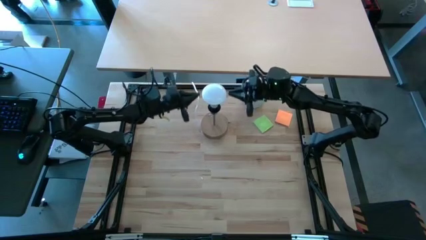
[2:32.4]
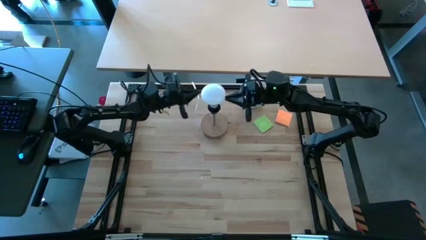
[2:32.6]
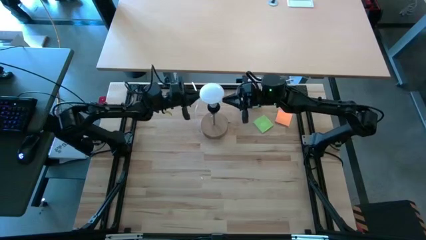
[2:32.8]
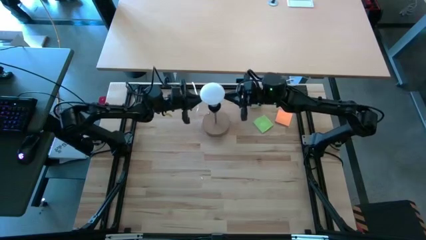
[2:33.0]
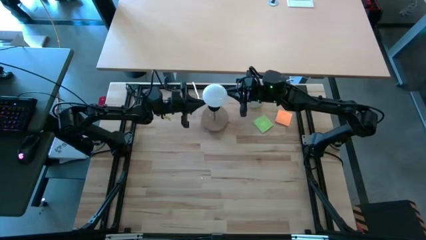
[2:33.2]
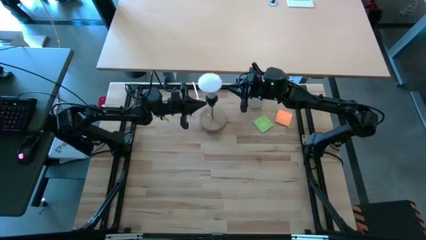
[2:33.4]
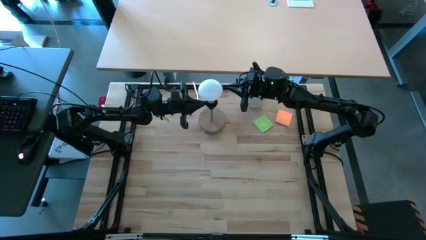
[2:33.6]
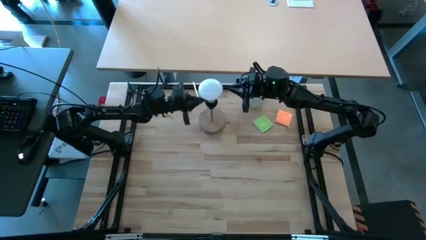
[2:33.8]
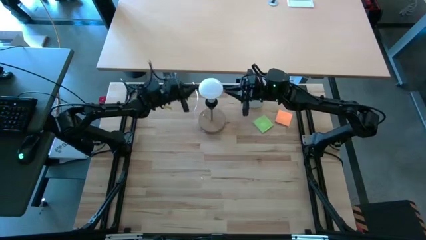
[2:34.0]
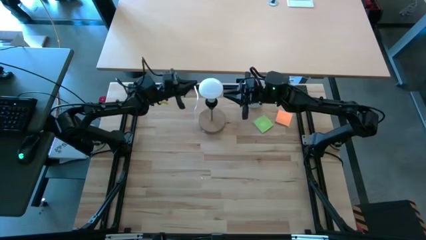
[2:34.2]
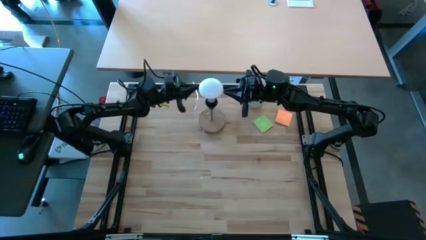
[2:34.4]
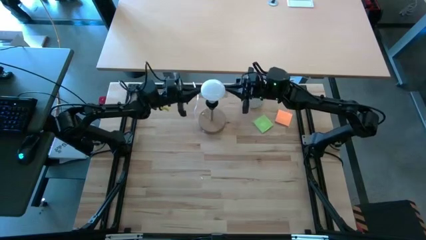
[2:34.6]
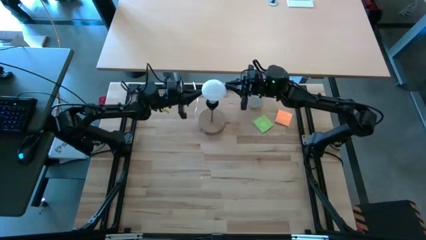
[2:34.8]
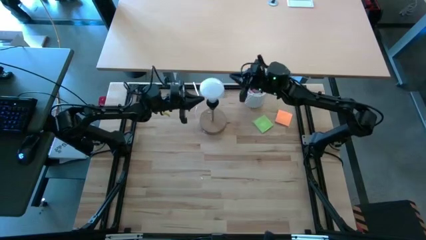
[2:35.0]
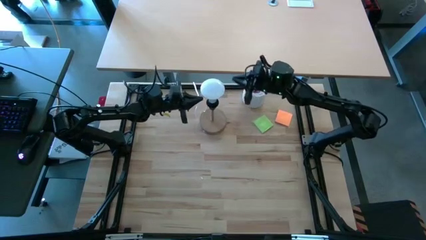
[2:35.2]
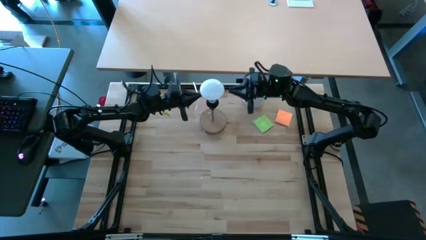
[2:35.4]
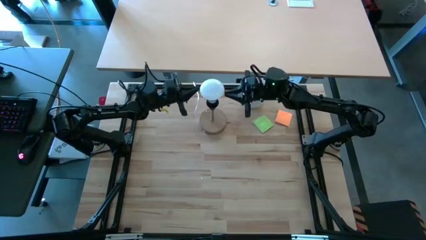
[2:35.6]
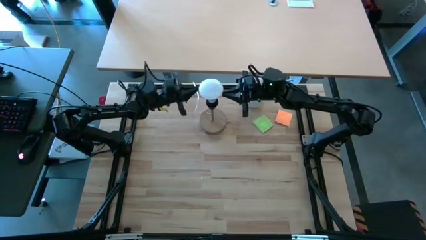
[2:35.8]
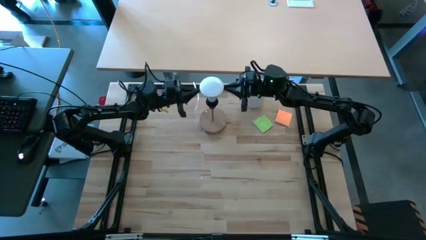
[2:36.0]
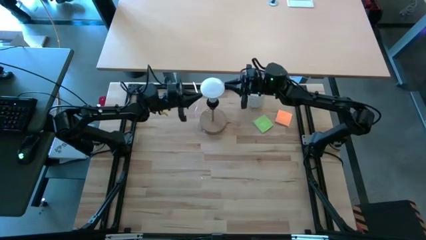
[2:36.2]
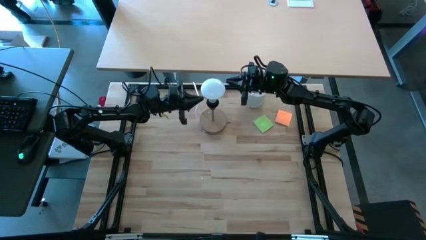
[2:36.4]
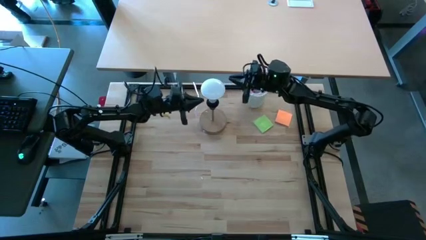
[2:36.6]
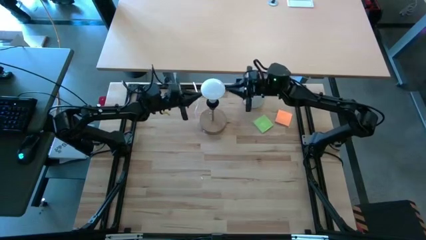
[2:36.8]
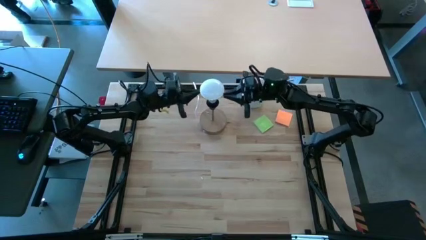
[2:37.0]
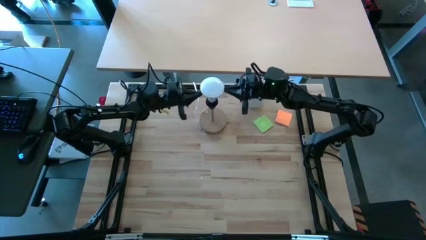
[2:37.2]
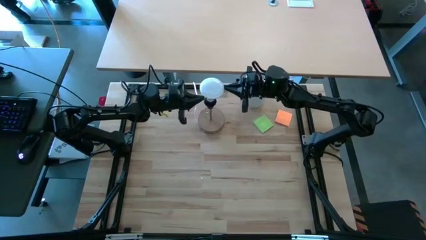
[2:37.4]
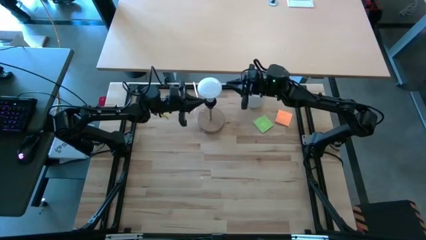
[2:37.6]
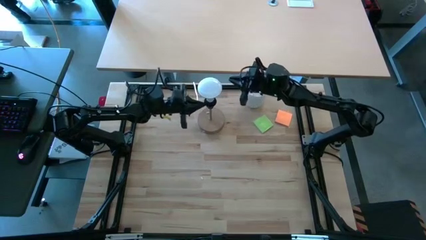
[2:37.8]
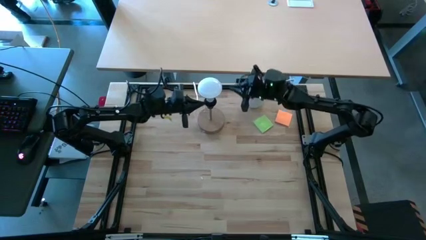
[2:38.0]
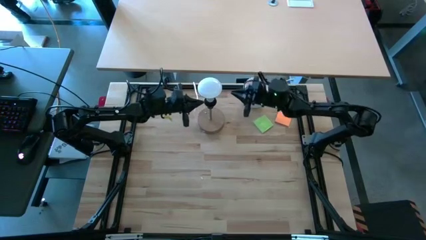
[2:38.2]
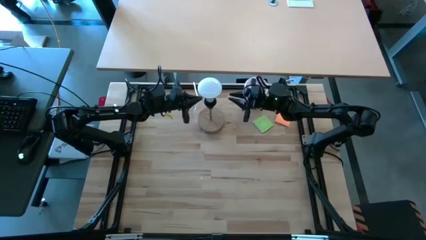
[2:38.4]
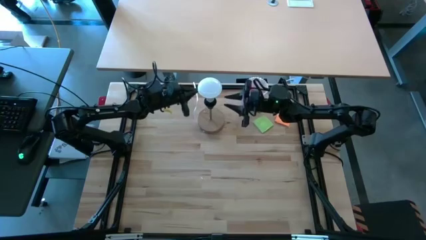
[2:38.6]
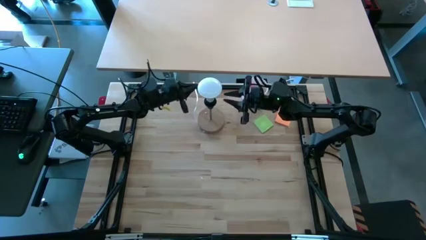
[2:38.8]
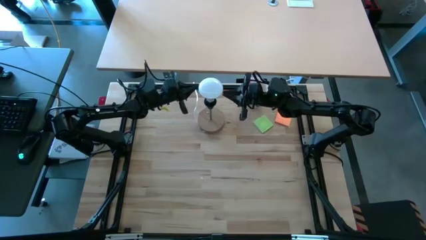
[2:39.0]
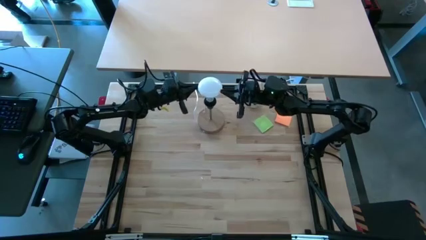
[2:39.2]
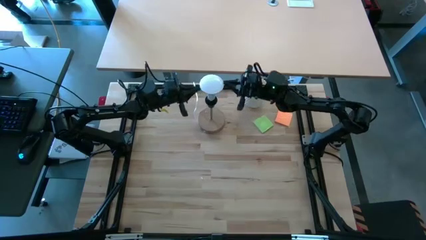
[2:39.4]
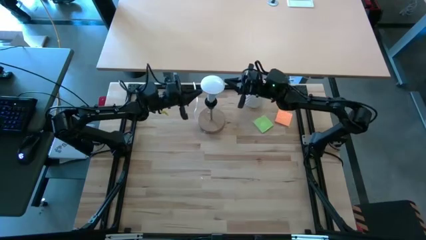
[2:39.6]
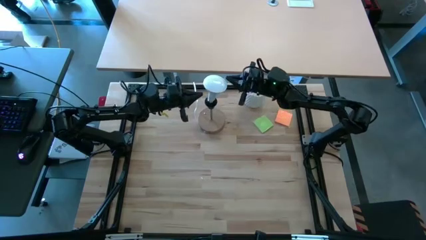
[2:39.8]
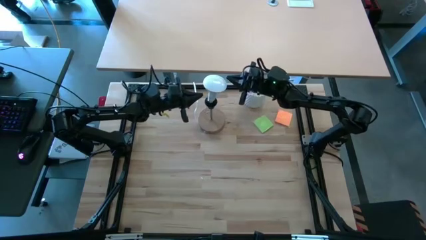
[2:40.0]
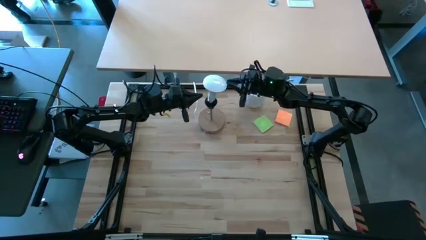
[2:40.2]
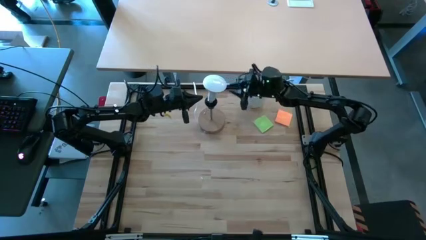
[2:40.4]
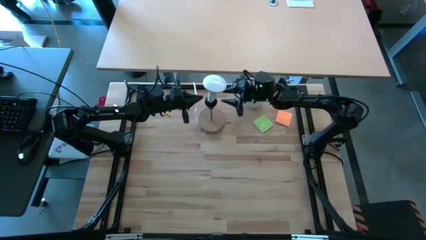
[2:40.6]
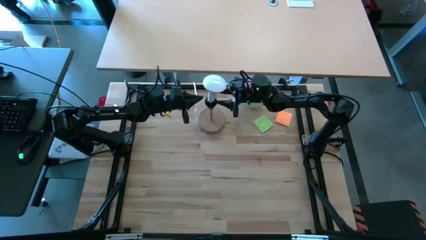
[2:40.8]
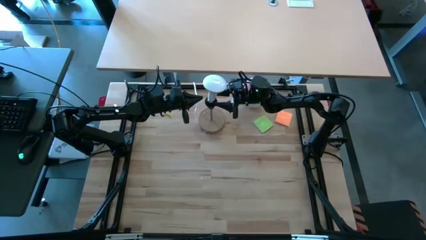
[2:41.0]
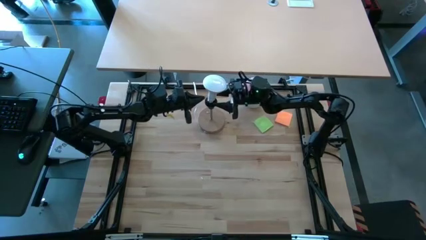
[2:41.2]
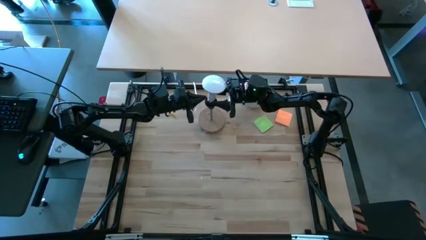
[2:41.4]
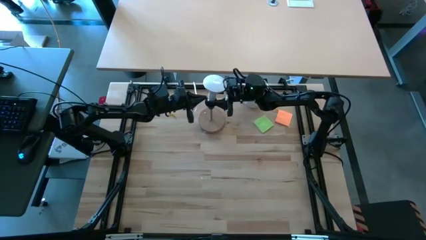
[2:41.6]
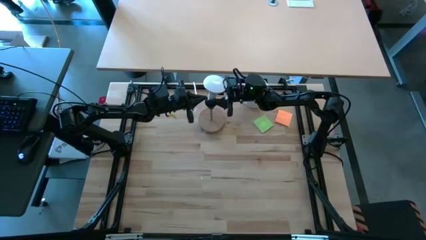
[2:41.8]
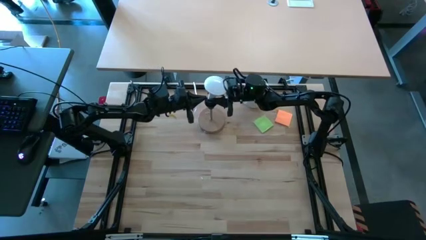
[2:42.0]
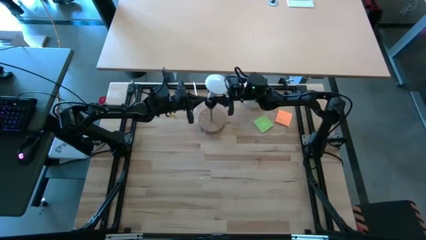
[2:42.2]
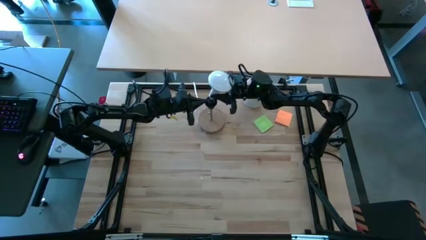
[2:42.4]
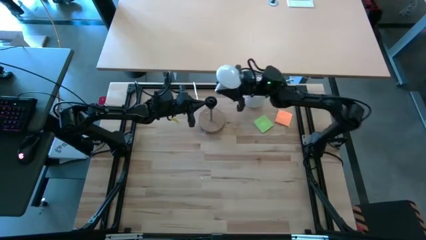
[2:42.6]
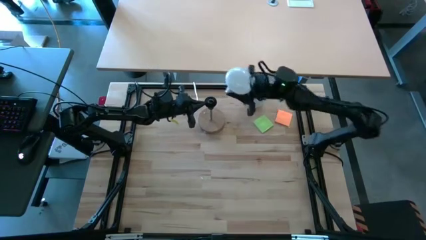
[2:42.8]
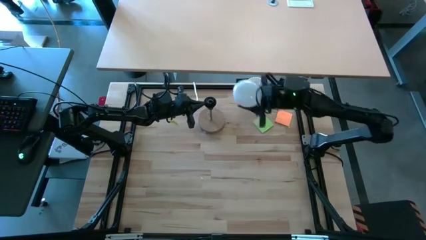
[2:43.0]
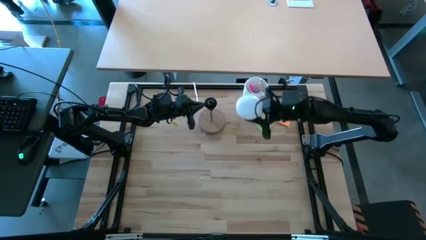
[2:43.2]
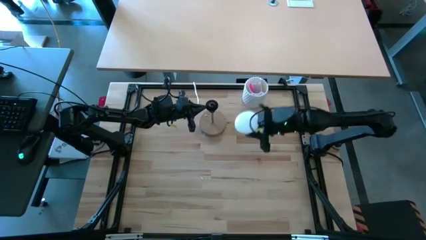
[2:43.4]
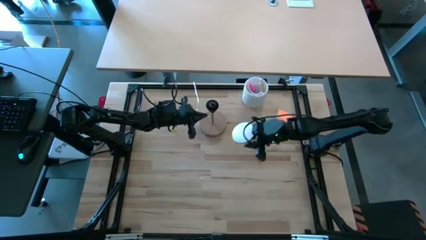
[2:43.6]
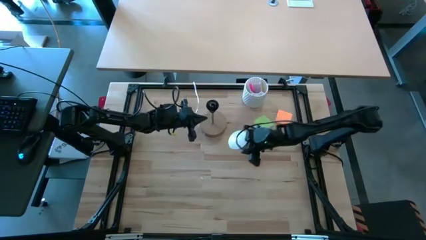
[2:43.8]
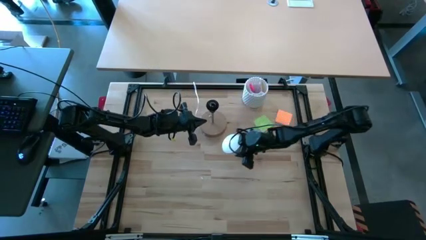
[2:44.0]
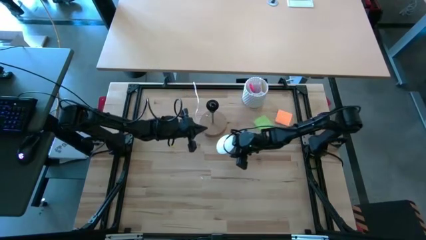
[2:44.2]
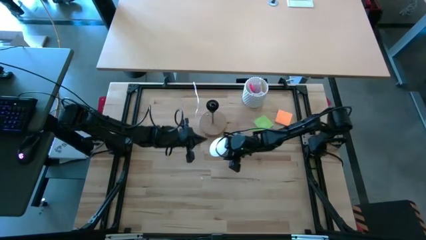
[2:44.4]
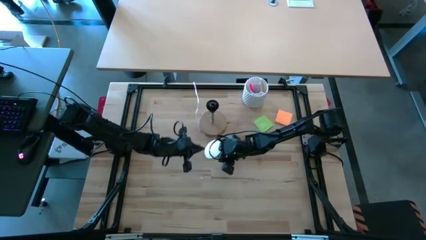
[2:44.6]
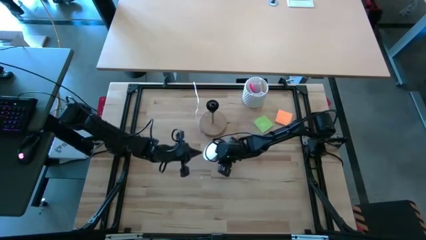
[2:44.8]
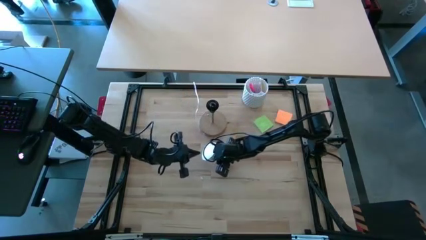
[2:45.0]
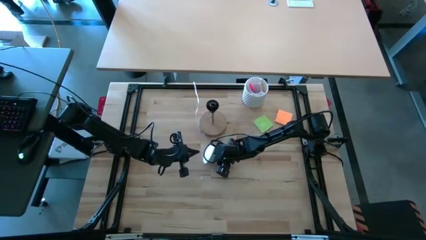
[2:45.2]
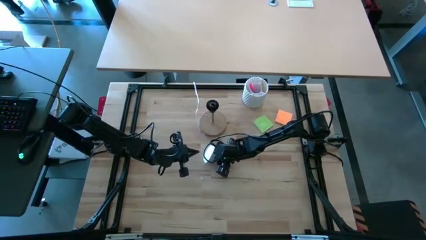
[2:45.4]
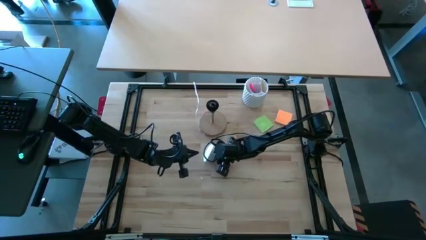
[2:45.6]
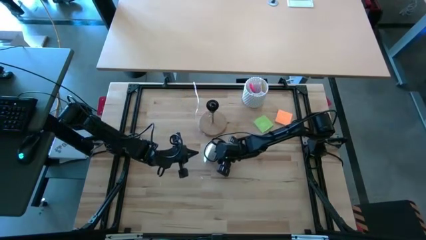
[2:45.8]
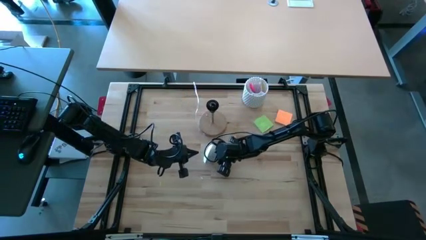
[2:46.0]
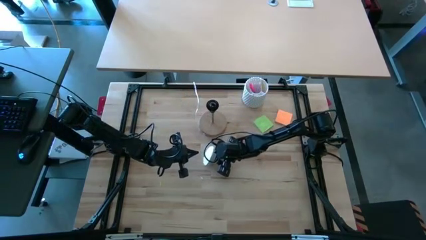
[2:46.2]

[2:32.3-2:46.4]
Task: Screw lightbulb
Remove the white lightbulb from the brown lamp

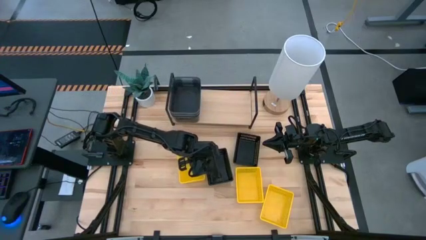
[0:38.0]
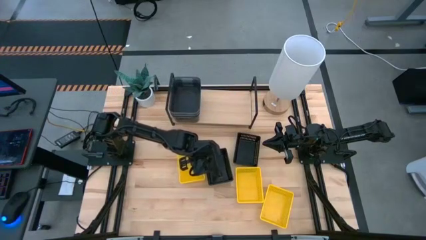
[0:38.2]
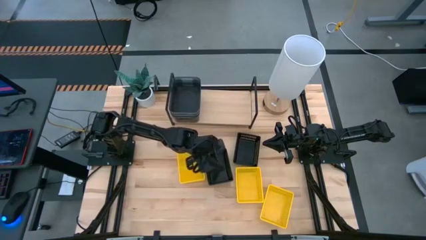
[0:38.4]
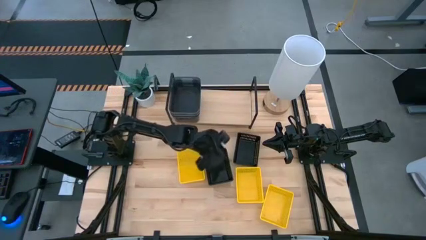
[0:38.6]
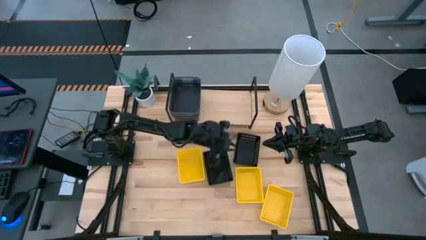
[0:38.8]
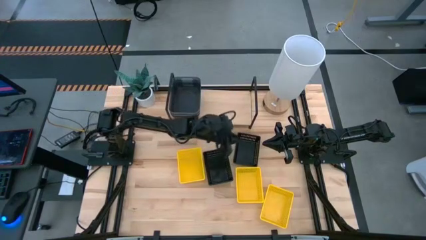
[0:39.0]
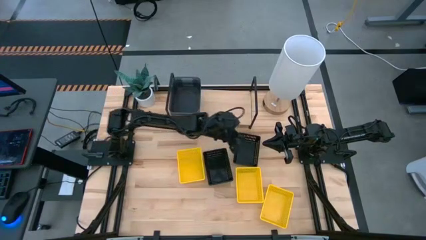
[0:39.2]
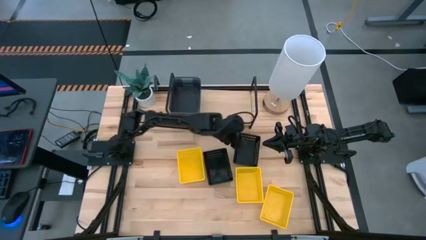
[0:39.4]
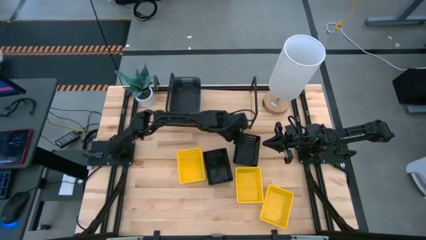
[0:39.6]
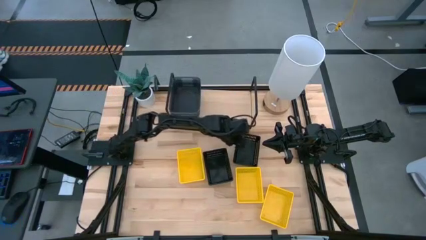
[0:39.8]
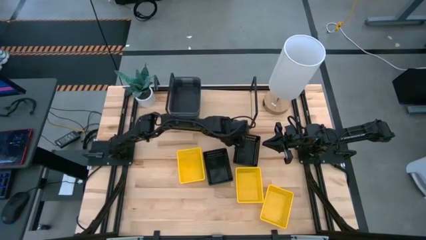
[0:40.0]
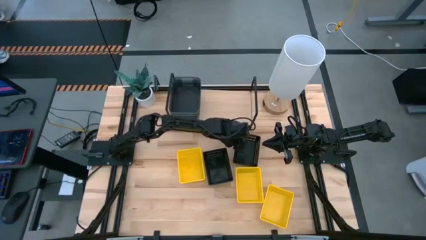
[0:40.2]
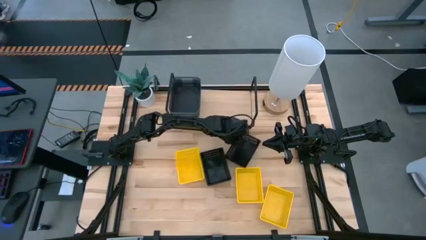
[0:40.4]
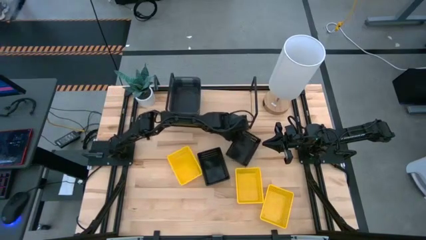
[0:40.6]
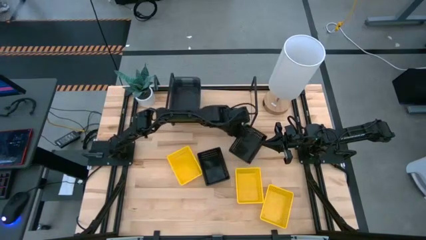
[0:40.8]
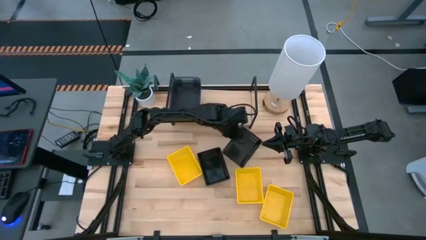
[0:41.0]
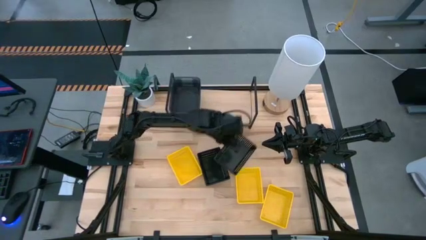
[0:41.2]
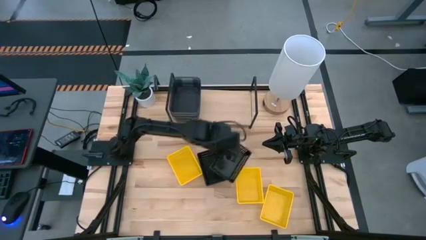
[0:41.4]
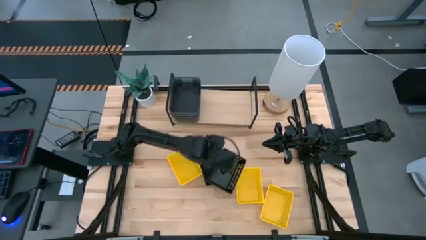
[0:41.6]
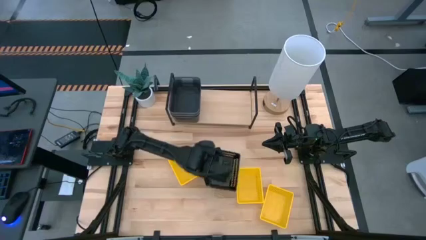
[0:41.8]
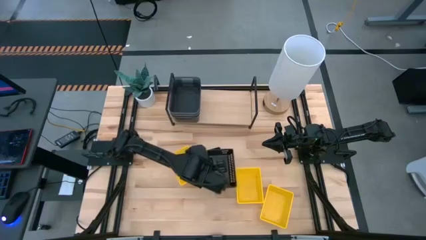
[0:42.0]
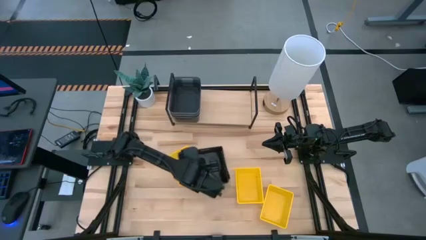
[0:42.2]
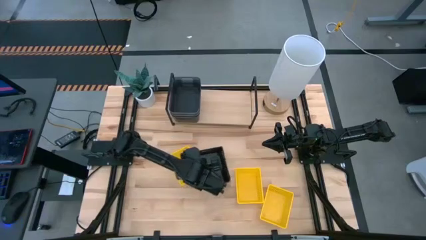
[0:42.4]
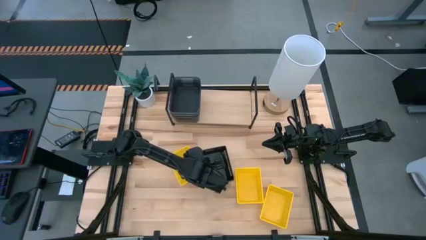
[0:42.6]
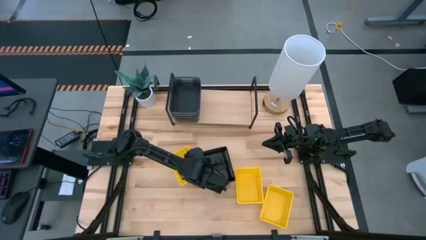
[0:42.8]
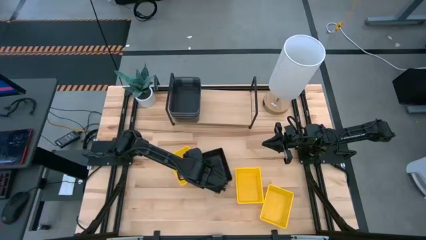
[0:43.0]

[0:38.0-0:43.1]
Task: Stack baskets on shelf by color
Stack the right black basket on top of the left black basket
